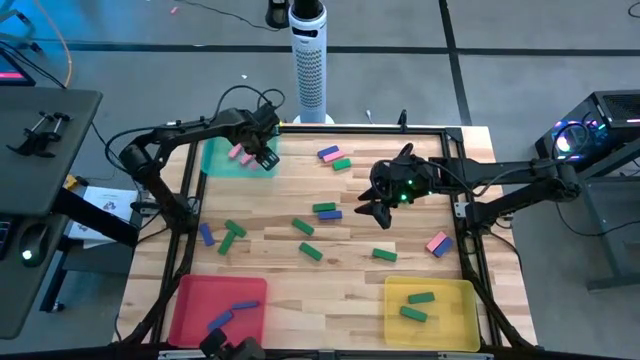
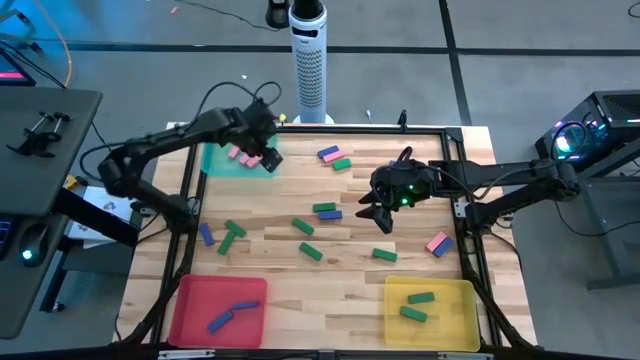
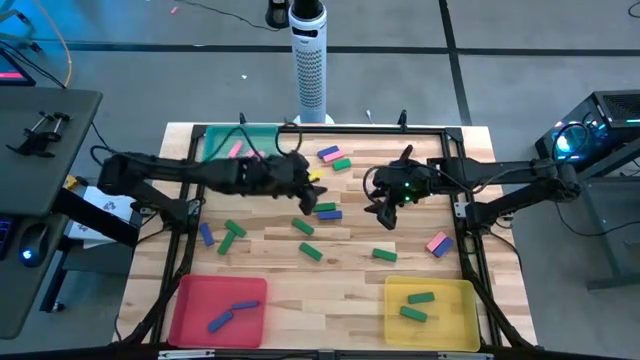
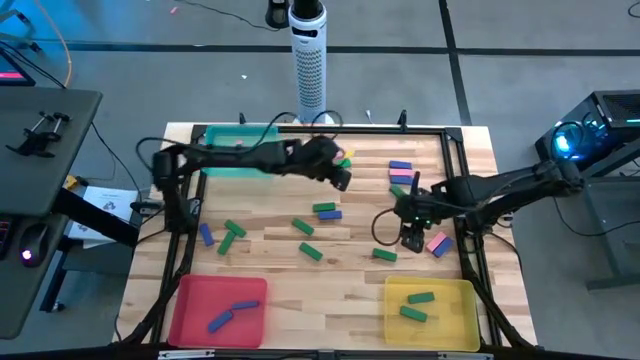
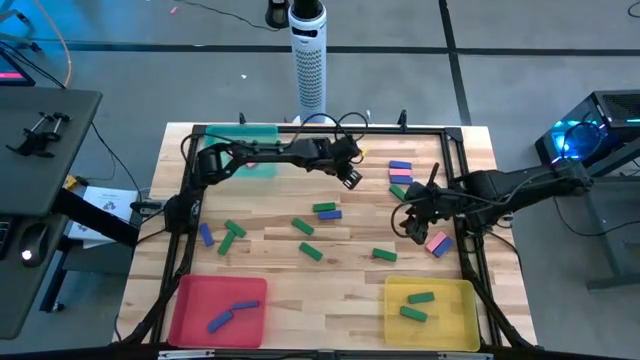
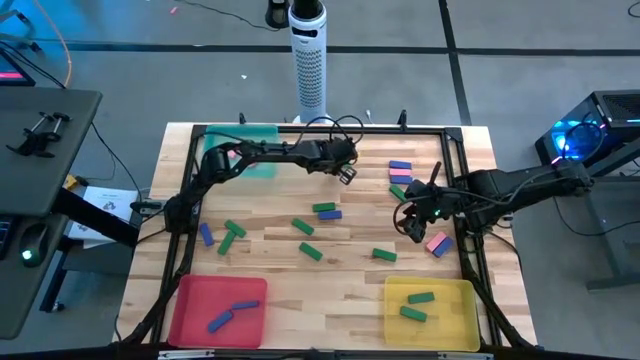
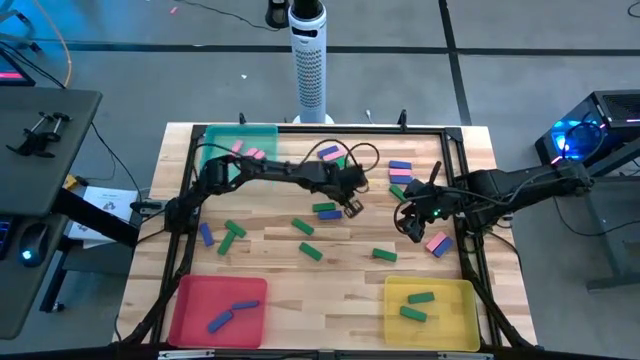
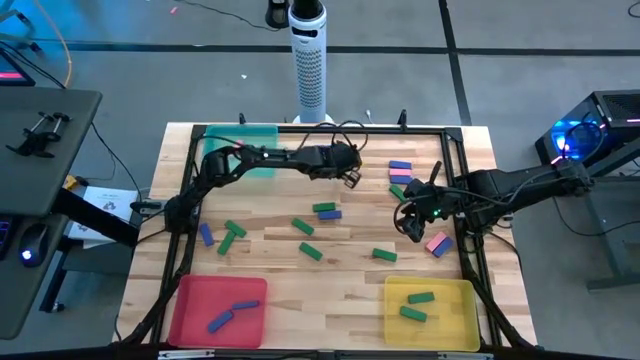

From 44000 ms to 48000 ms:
Task: Sort blocks
Put the green block into the yellow bin

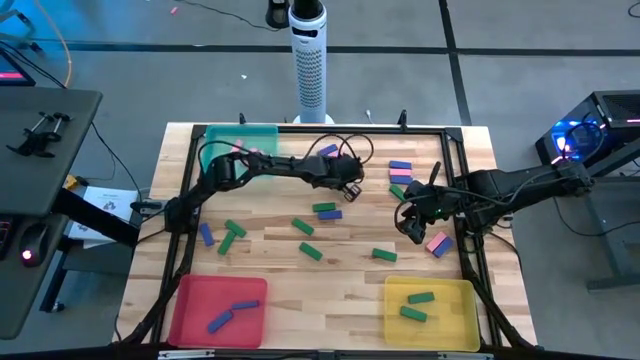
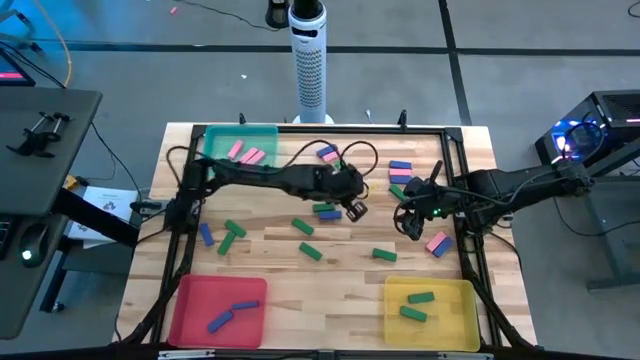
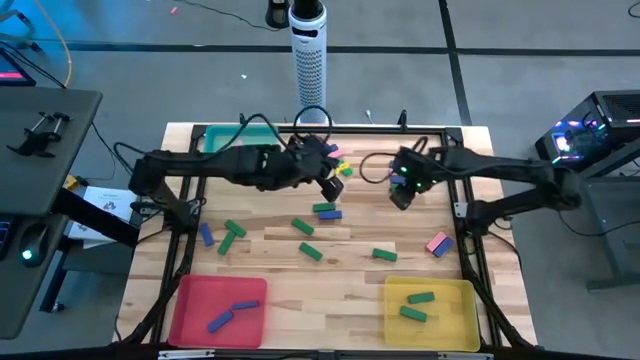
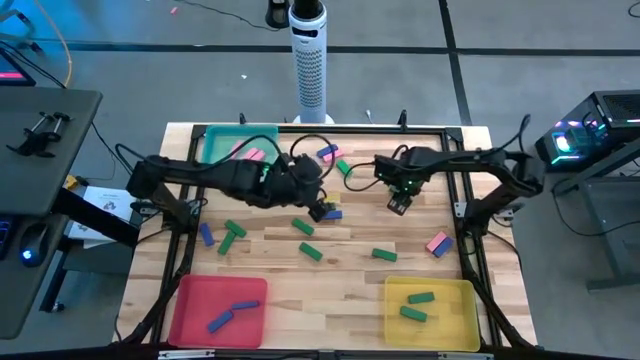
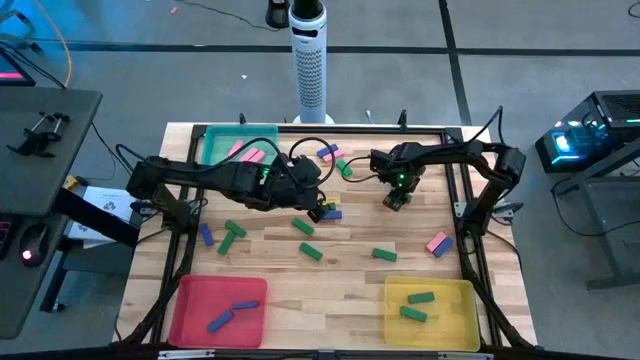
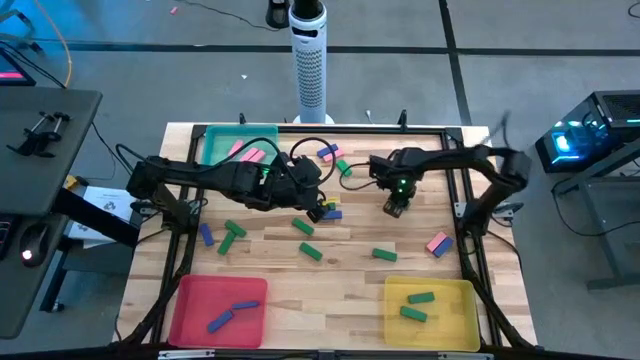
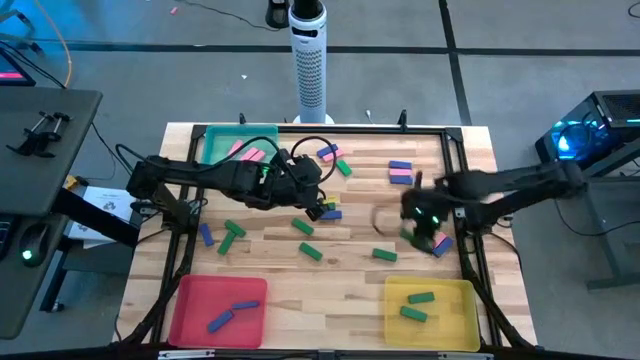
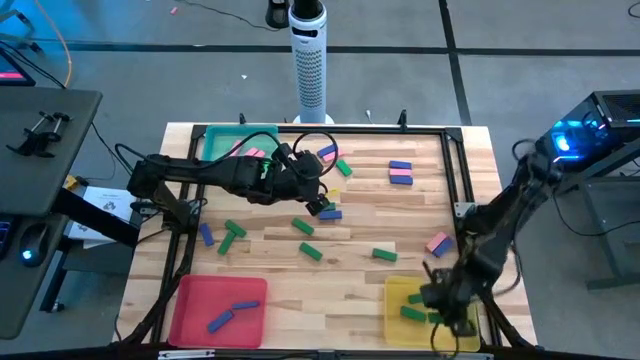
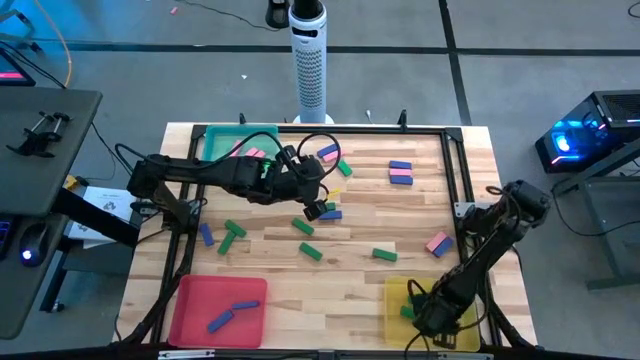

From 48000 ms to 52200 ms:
Put the green block into the yellow bin

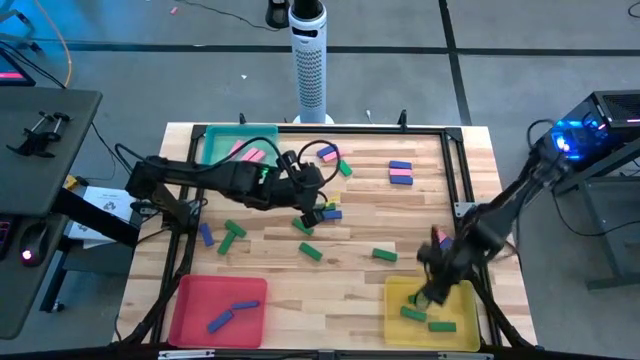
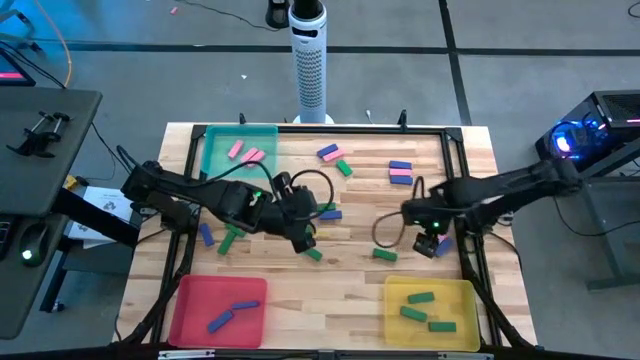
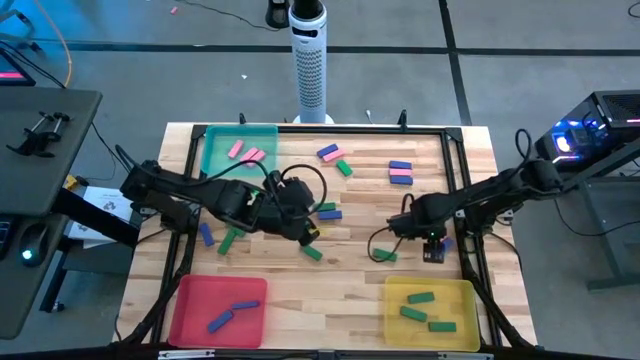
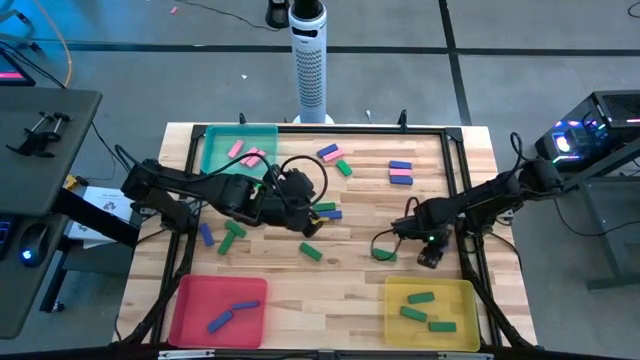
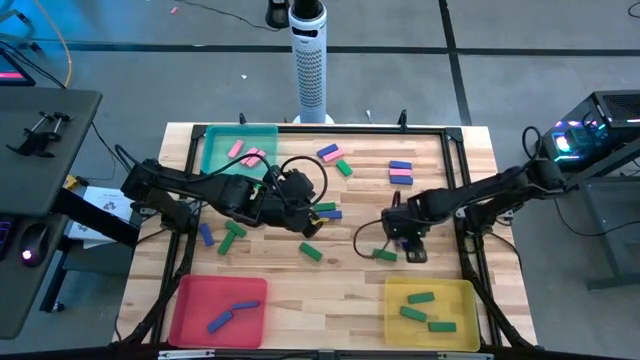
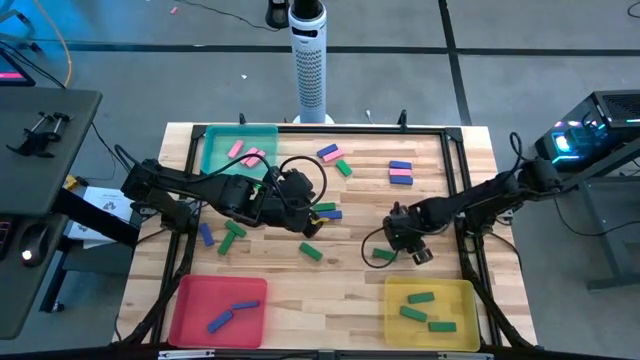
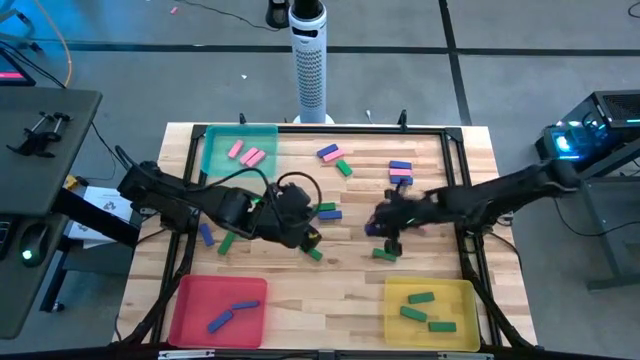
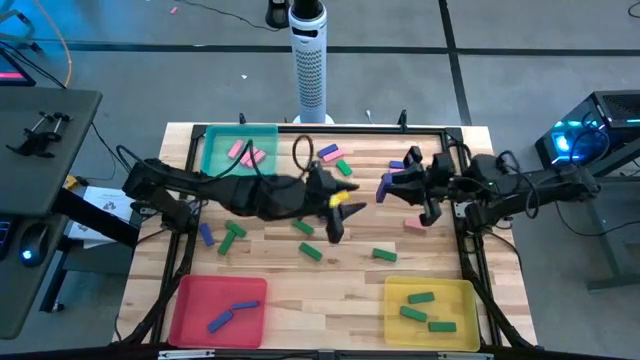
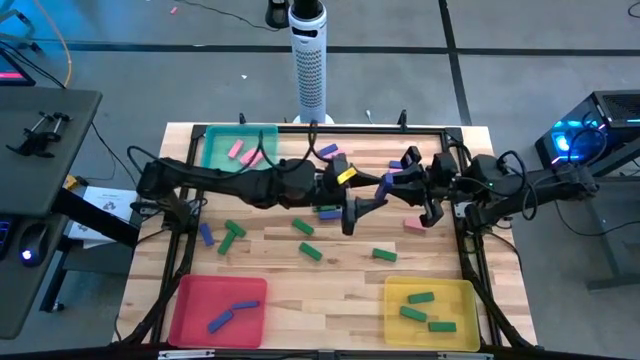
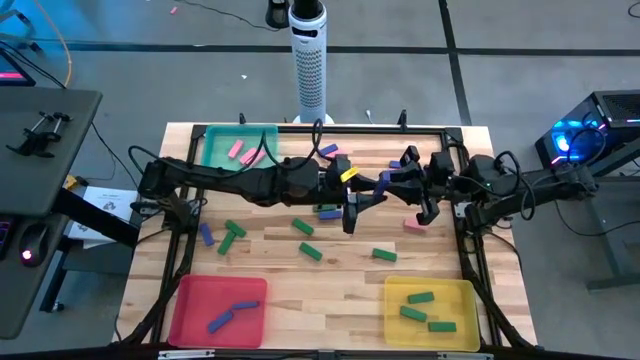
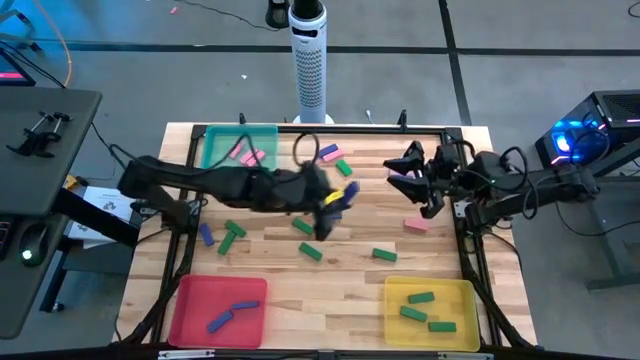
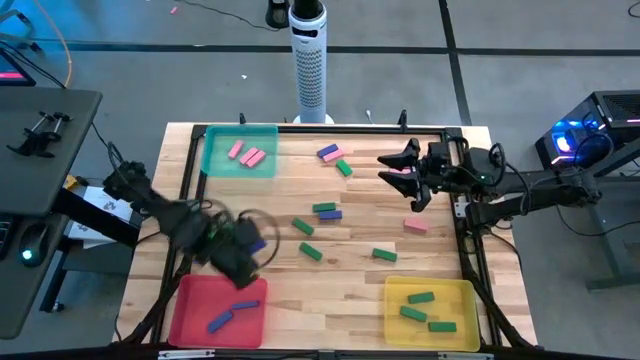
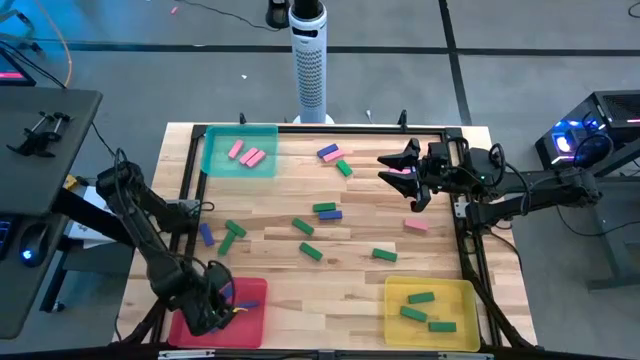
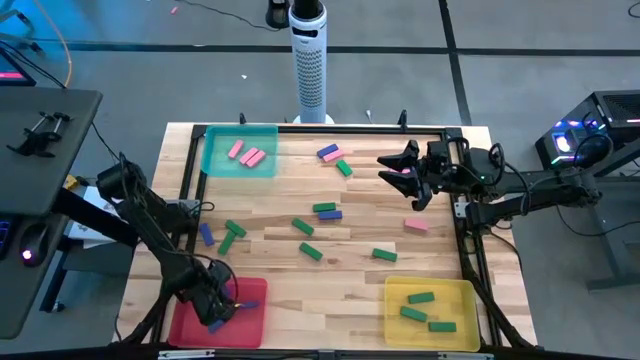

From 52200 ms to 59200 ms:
Put the blue block into the red bin

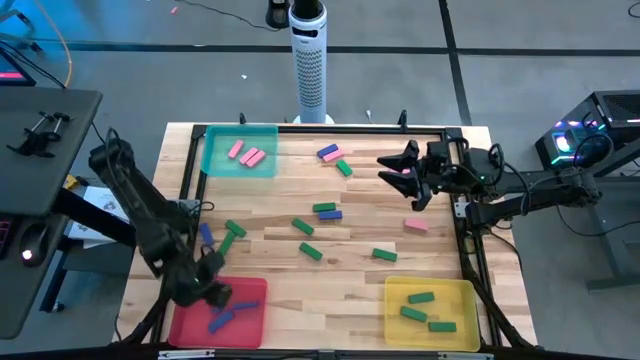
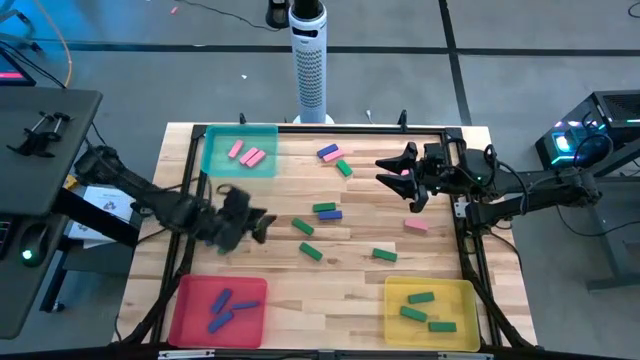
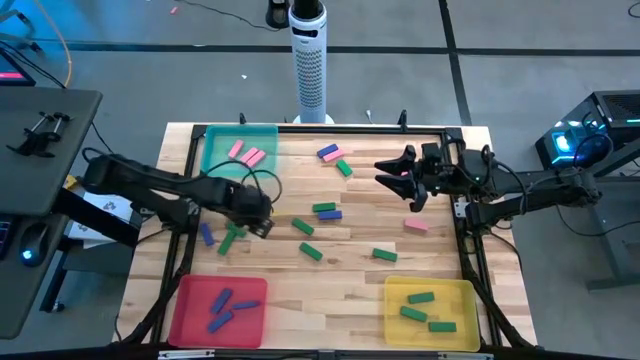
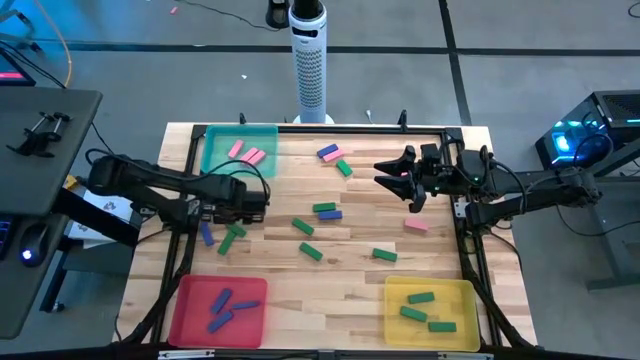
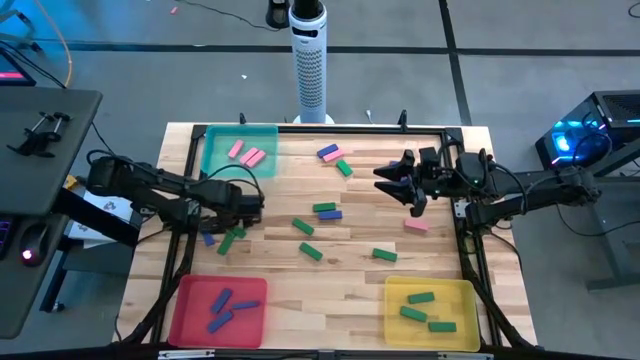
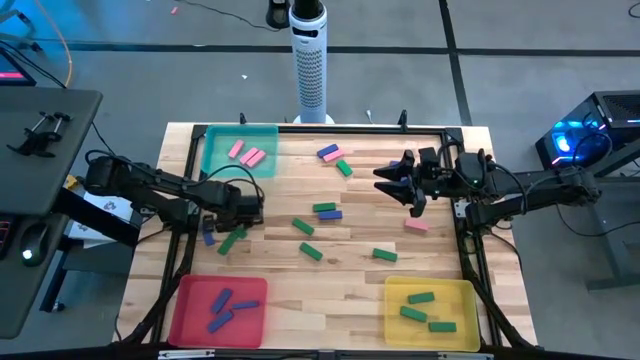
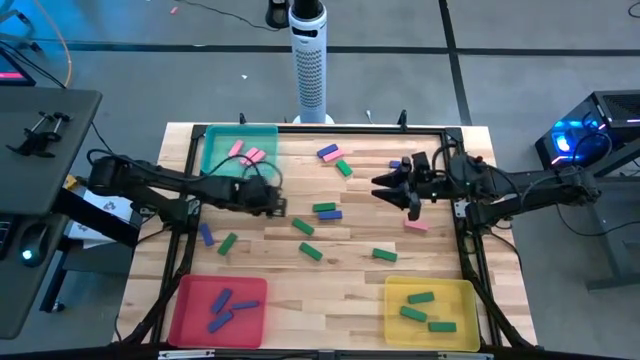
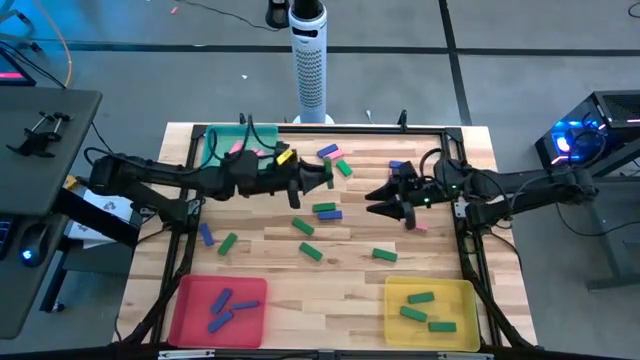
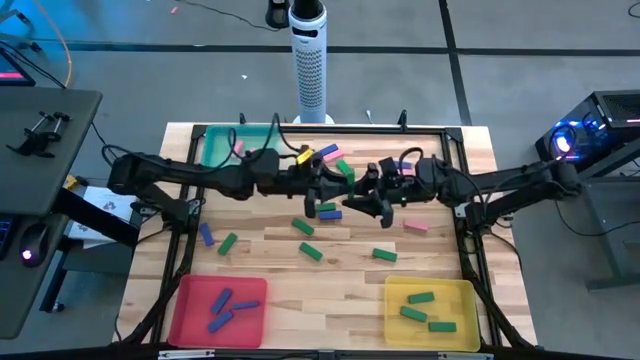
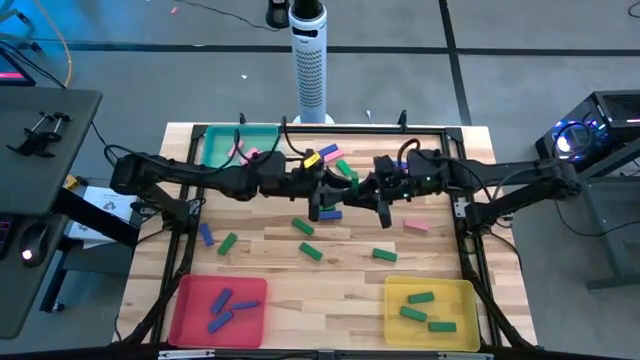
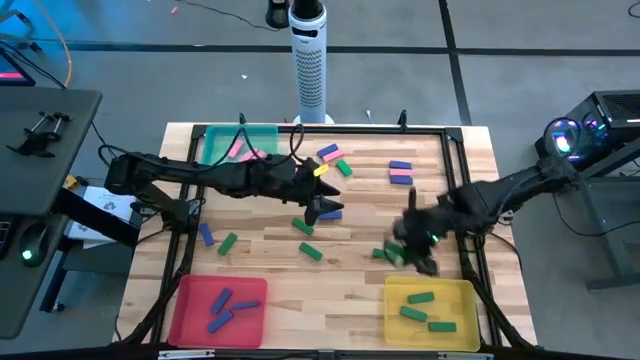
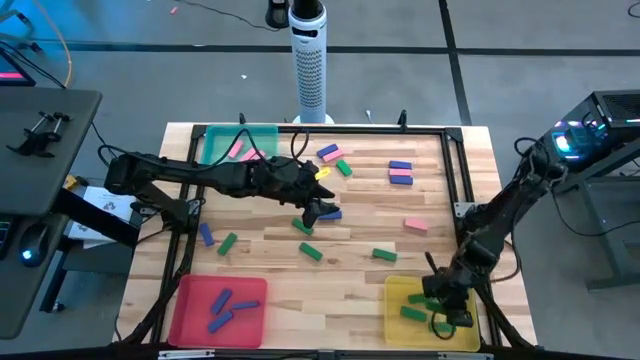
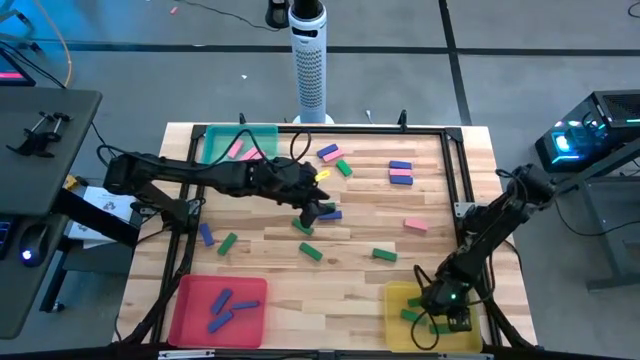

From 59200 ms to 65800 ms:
Put the green block into the yellow bin

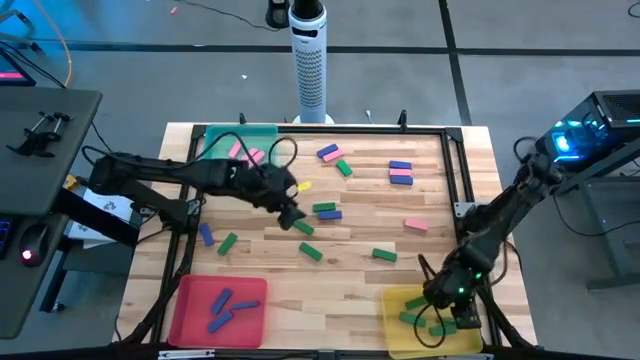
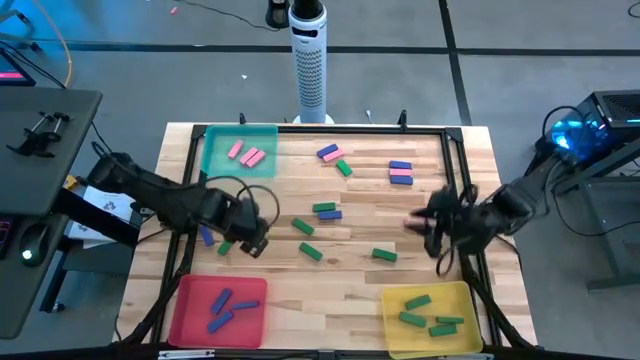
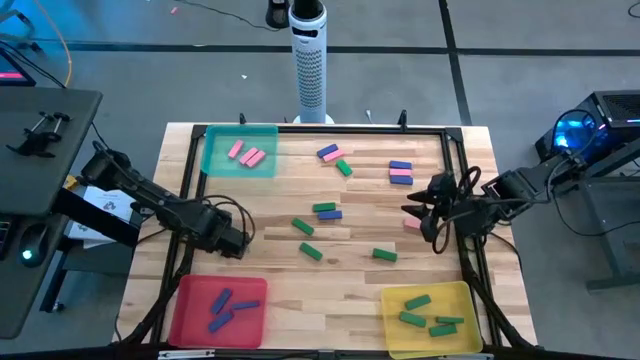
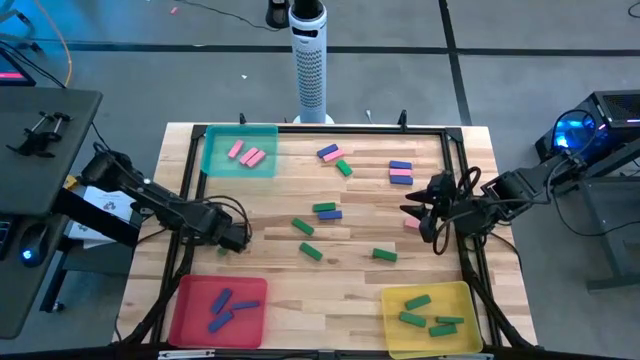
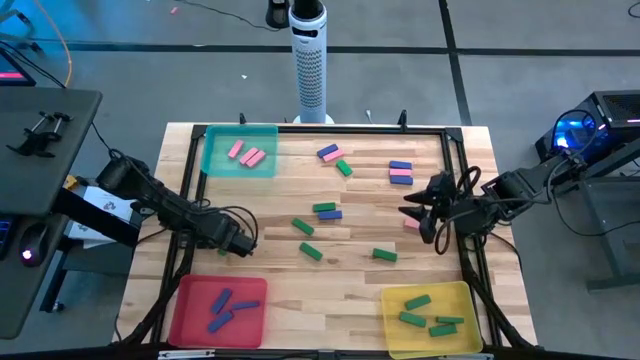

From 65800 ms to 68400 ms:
Put the blue block into the red bin
